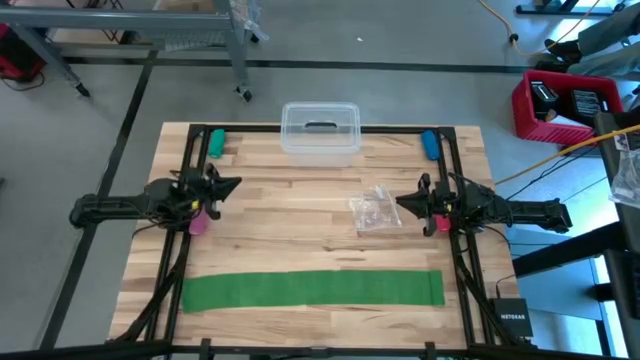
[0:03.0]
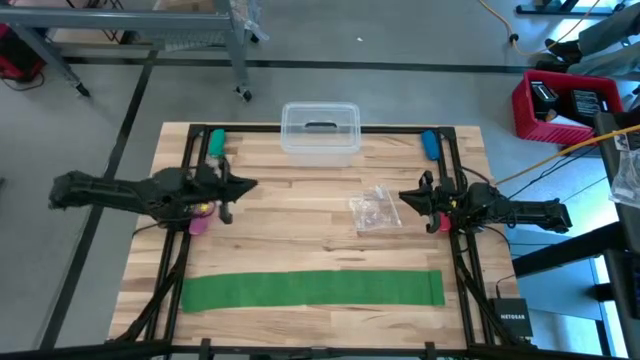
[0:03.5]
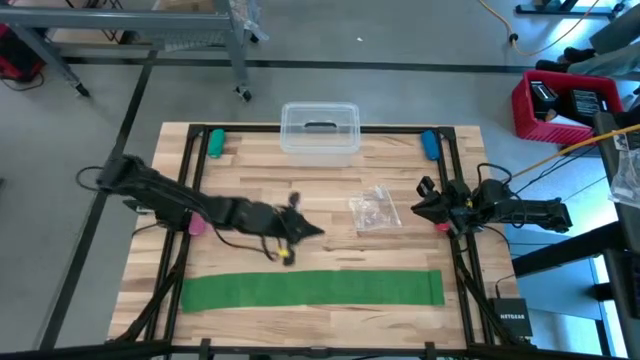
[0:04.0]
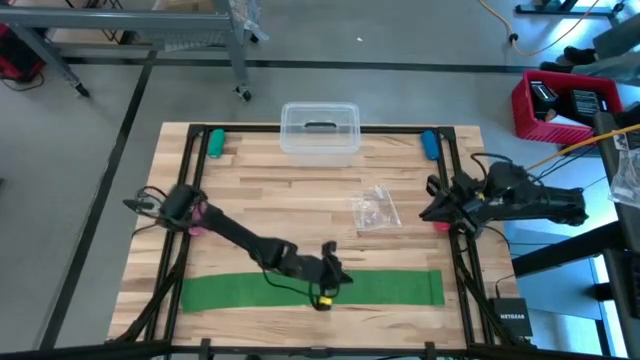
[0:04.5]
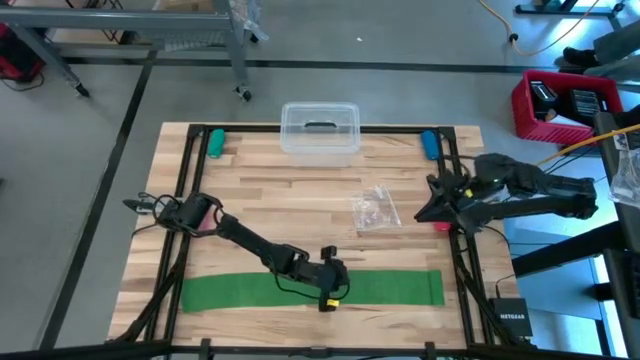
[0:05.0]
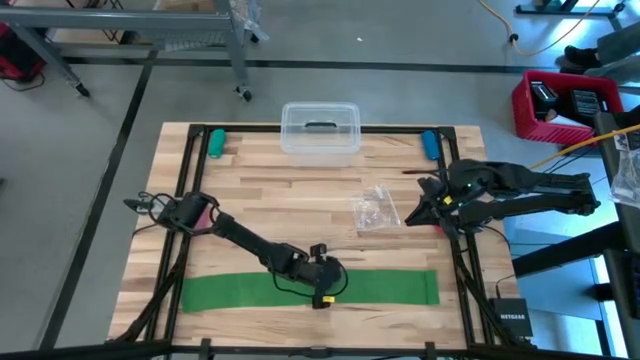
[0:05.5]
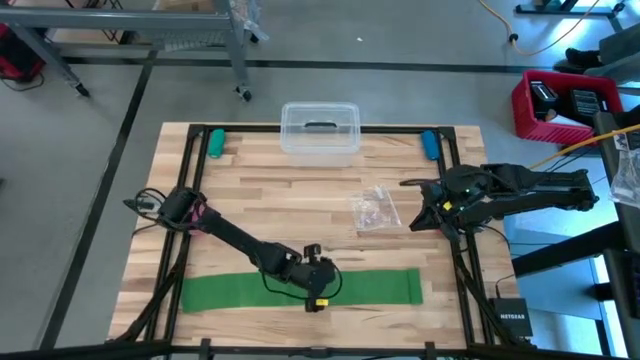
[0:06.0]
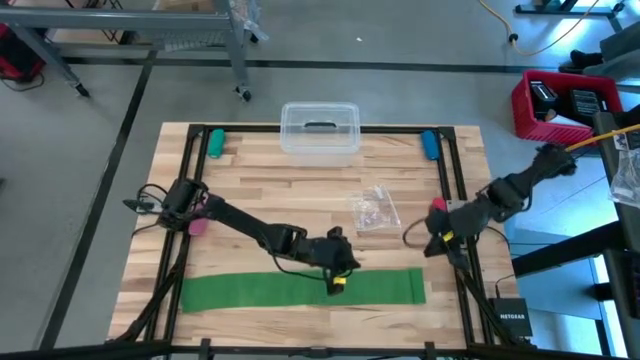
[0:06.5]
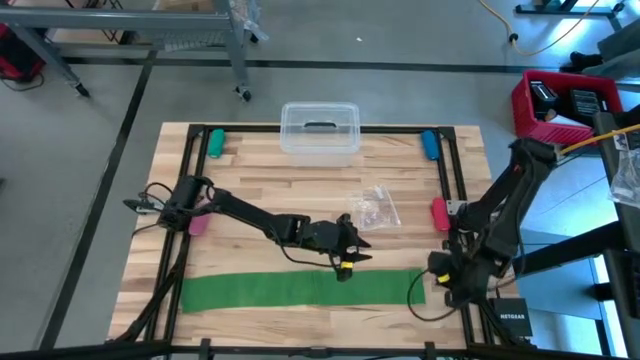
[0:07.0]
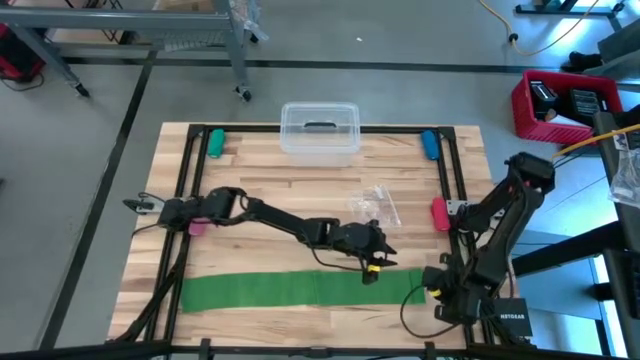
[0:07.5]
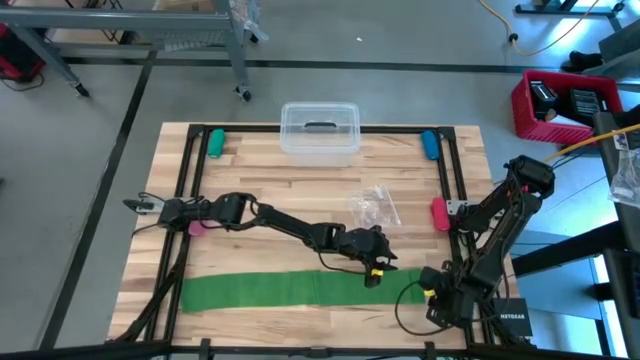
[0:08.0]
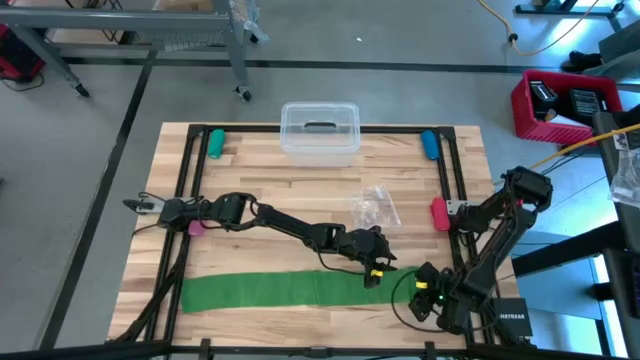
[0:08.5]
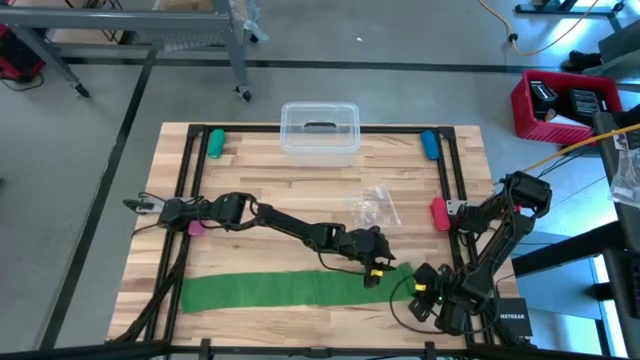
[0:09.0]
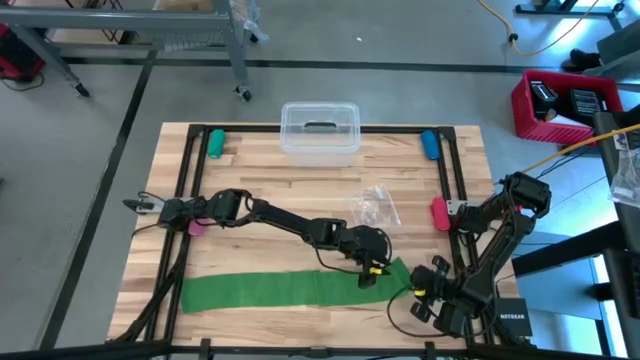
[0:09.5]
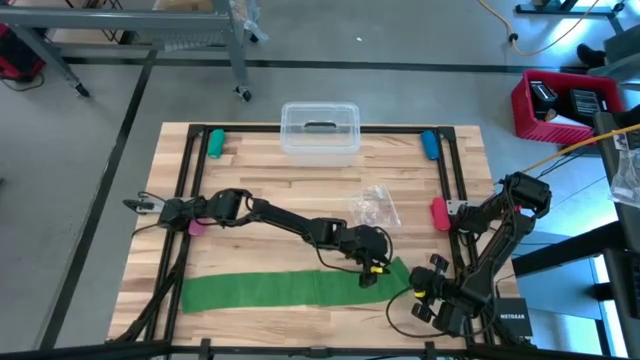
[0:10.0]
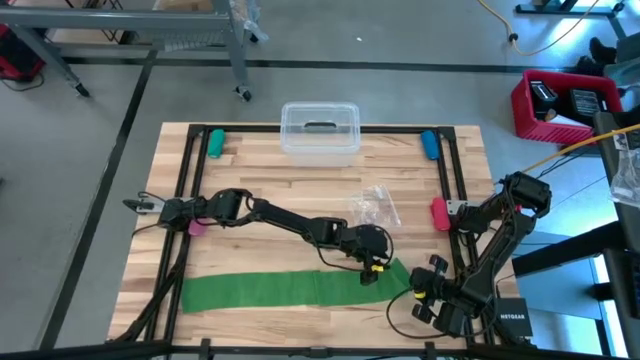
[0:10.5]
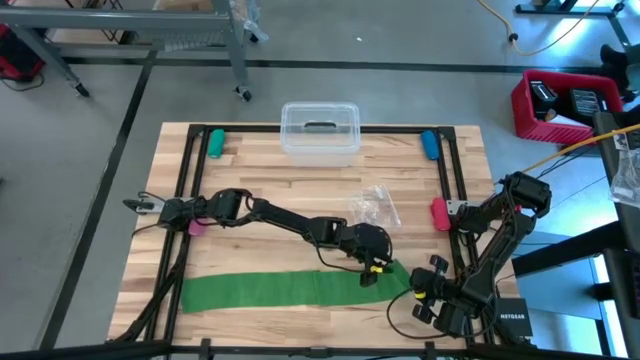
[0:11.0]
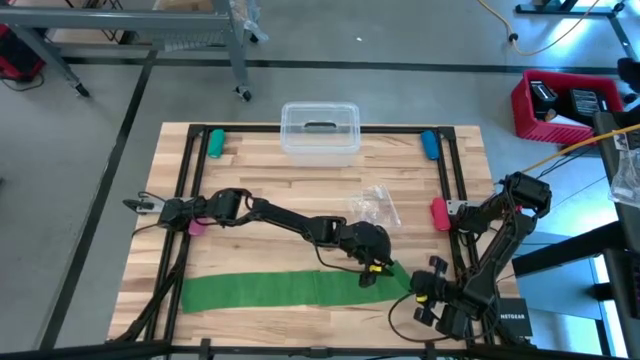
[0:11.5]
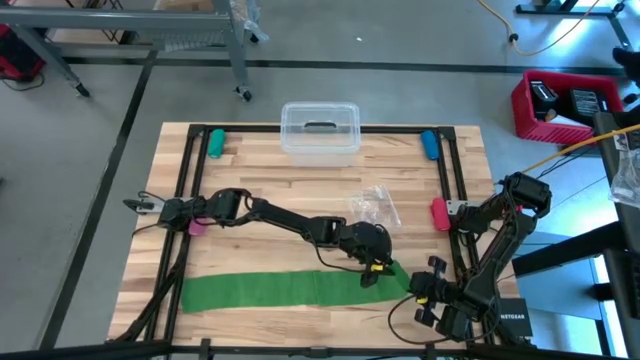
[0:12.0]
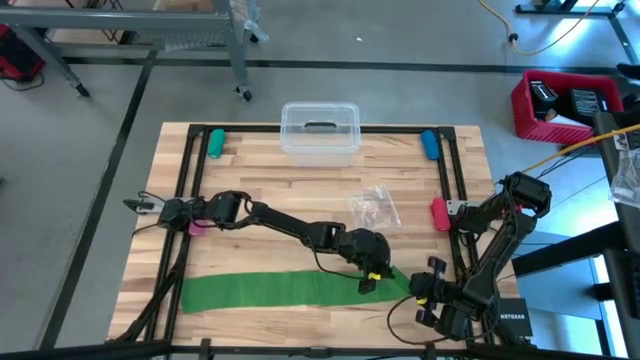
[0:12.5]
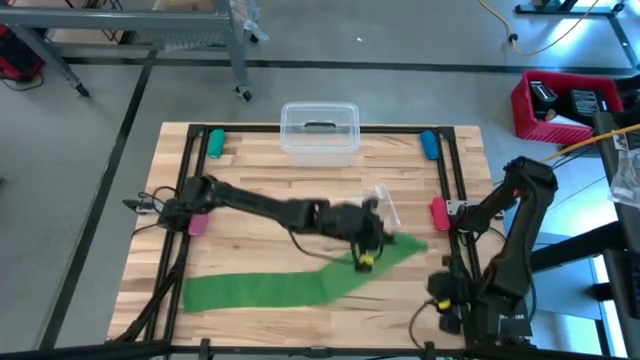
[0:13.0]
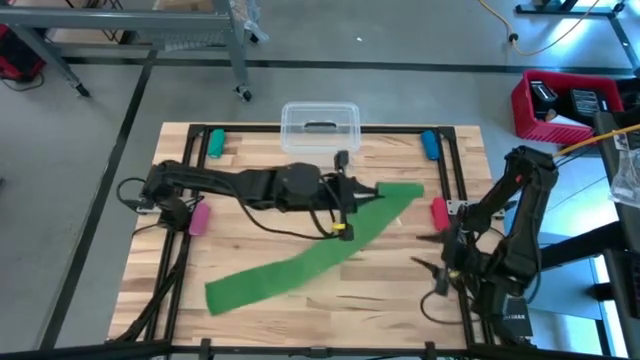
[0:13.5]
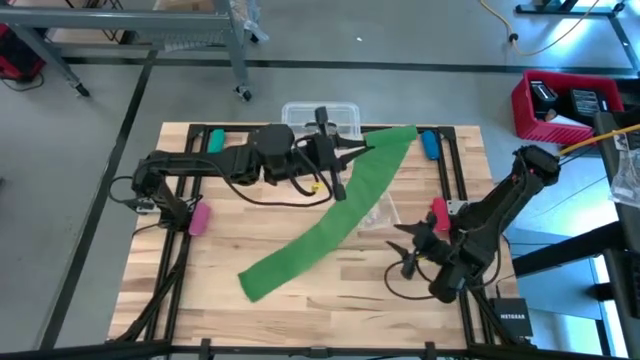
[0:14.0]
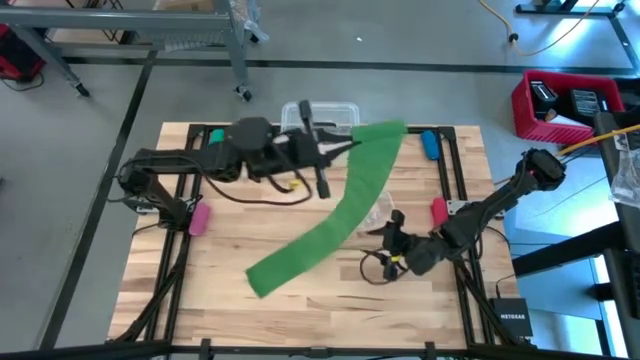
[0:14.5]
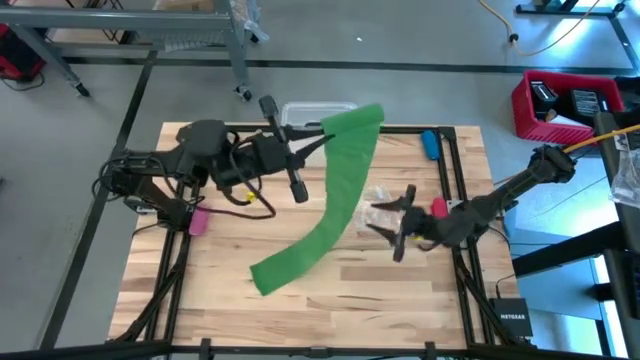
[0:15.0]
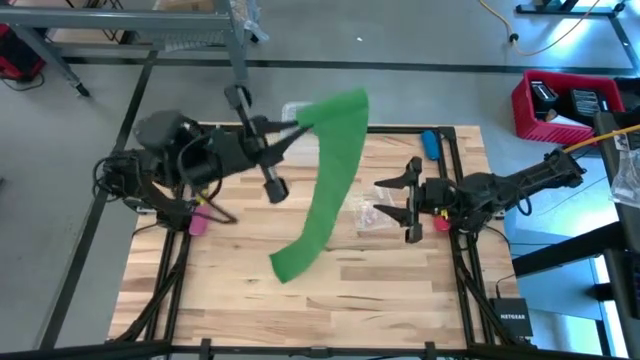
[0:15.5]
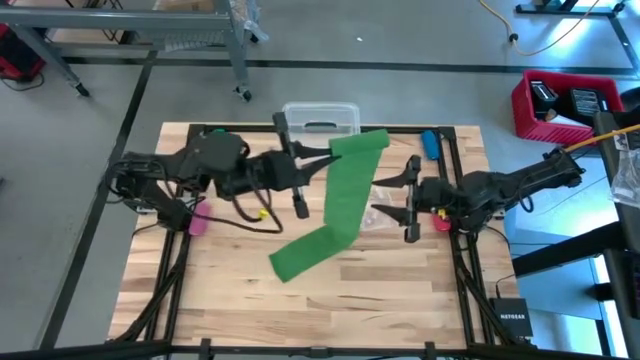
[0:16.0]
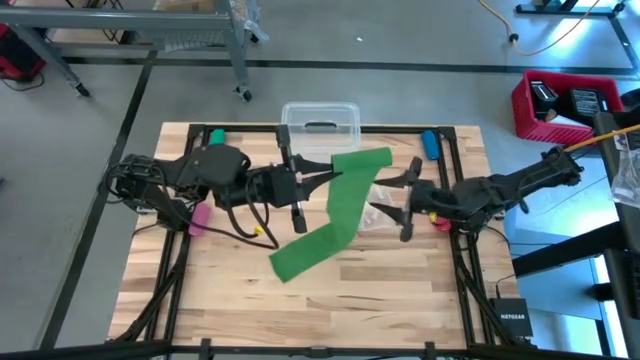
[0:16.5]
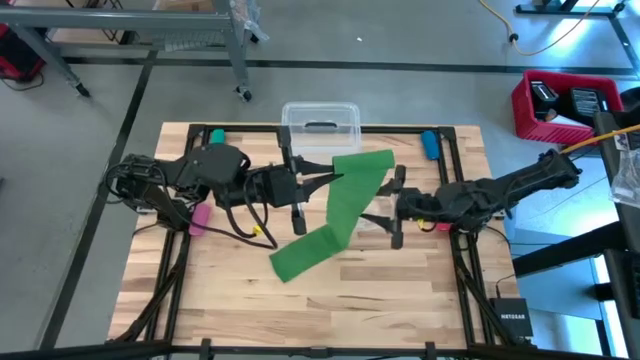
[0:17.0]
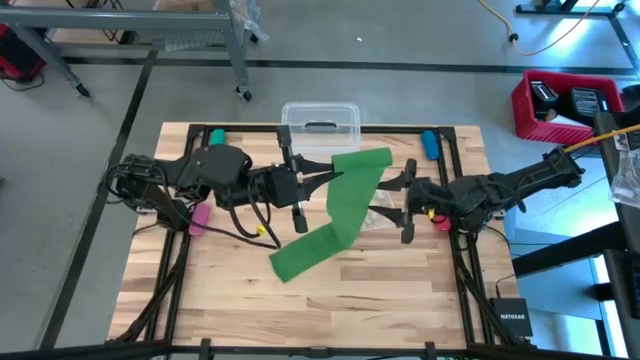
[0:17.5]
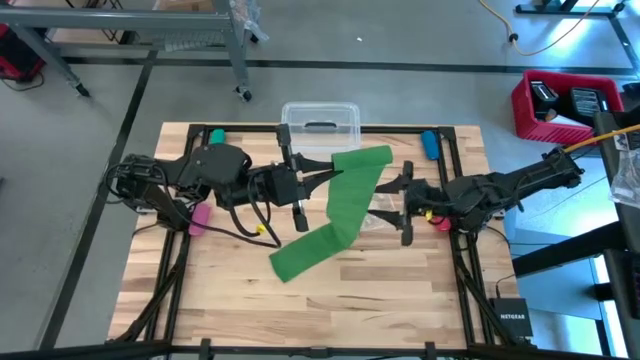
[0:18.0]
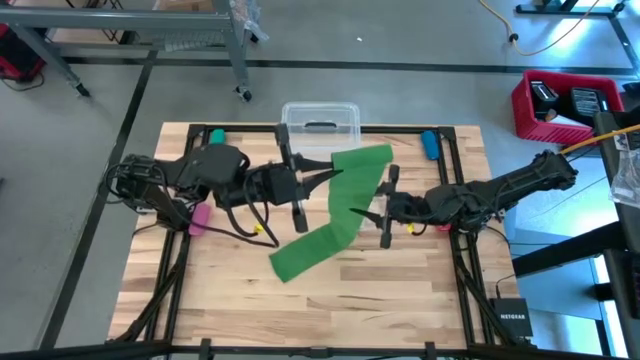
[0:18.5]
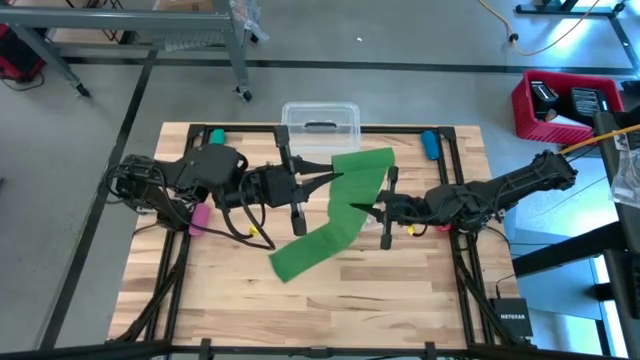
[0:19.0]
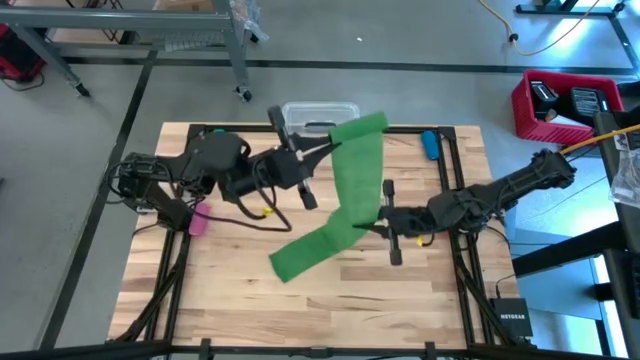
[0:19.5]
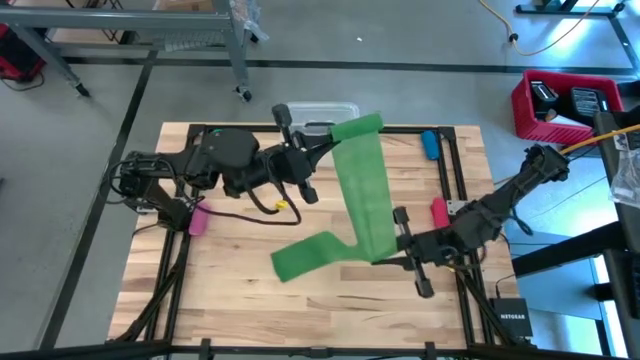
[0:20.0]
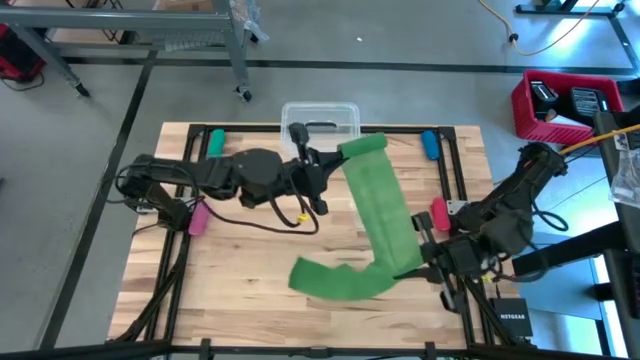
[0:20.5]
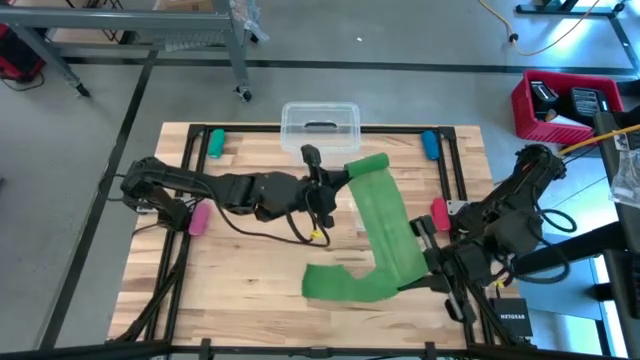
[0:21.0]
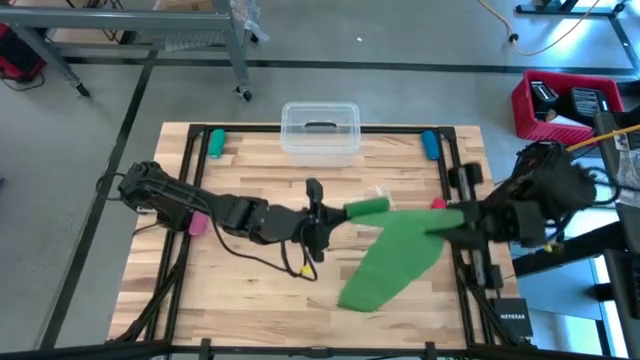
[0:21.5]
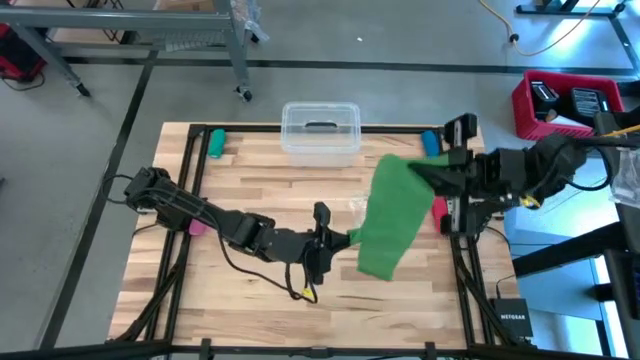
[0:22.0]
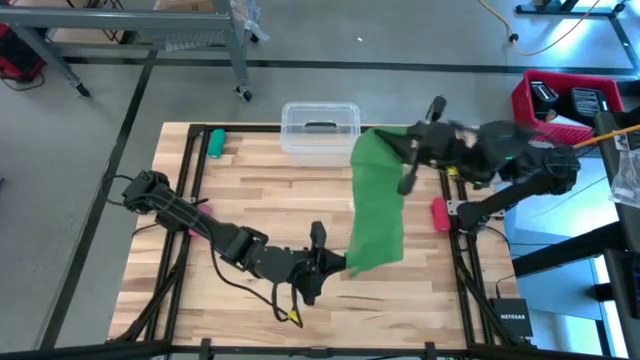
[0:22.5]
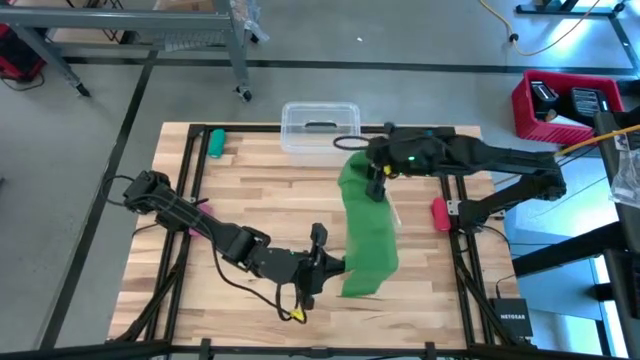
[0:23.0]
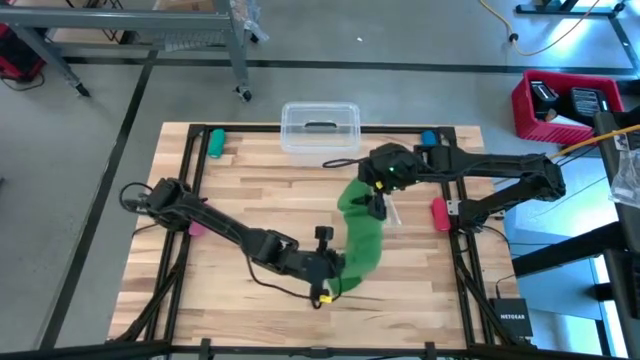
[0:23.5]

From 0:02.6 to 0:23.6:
Task: Roll bandage
Roll the green bandage
